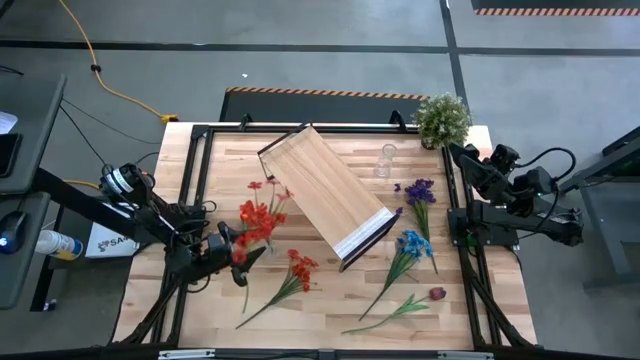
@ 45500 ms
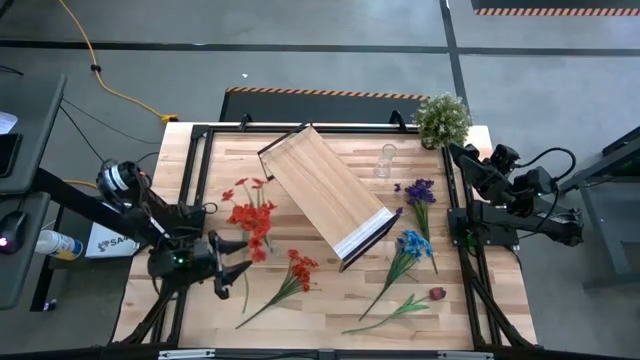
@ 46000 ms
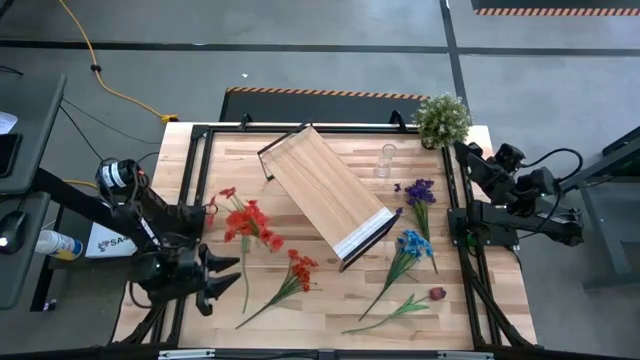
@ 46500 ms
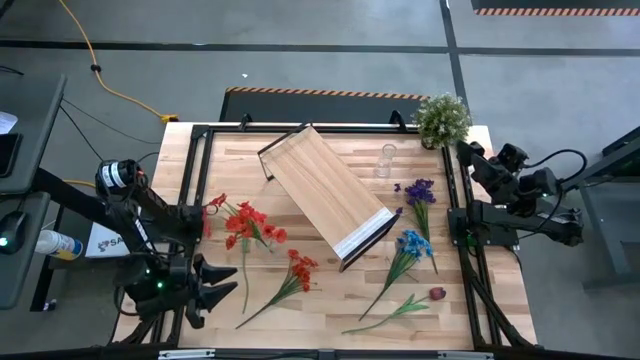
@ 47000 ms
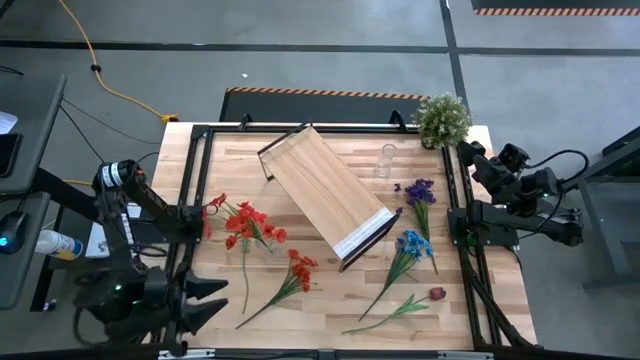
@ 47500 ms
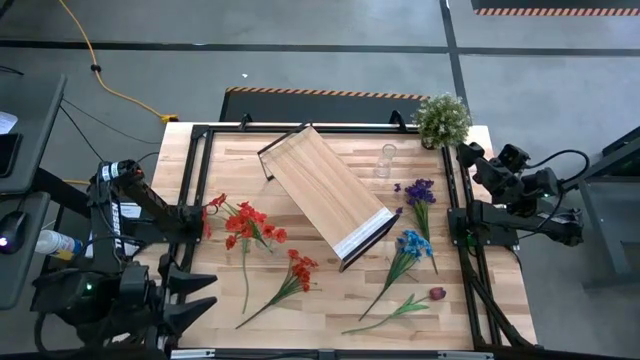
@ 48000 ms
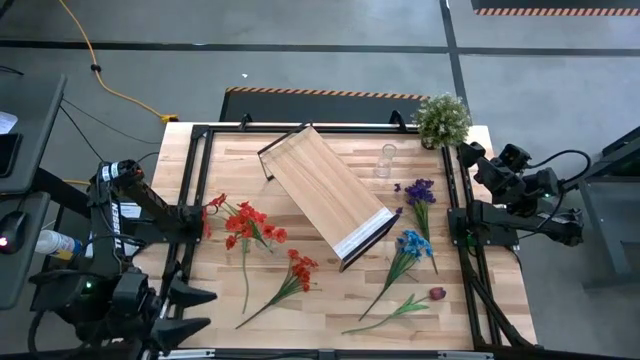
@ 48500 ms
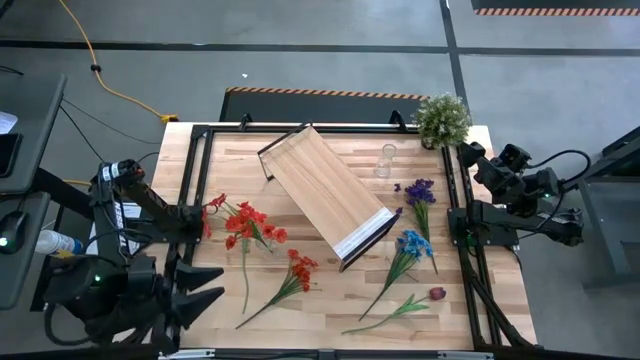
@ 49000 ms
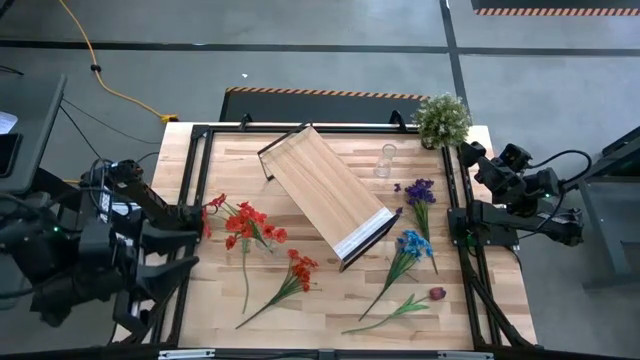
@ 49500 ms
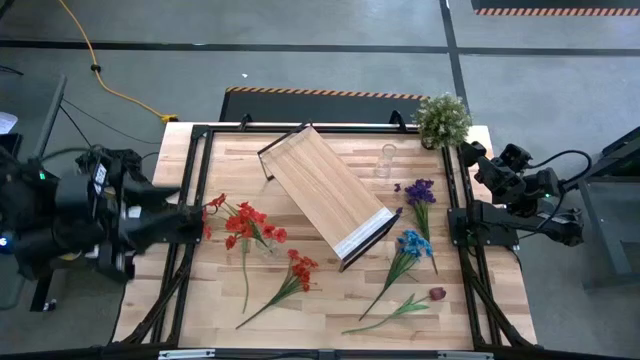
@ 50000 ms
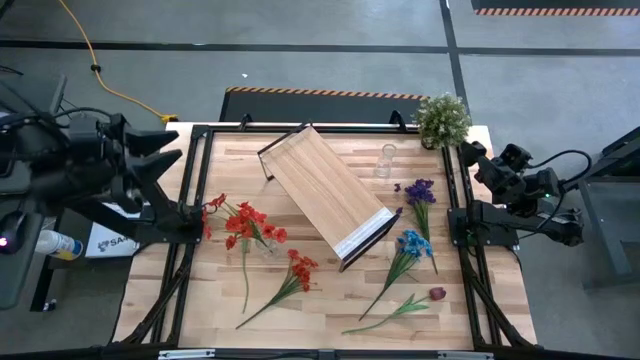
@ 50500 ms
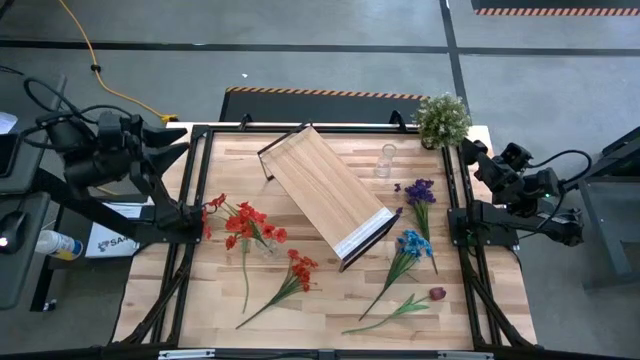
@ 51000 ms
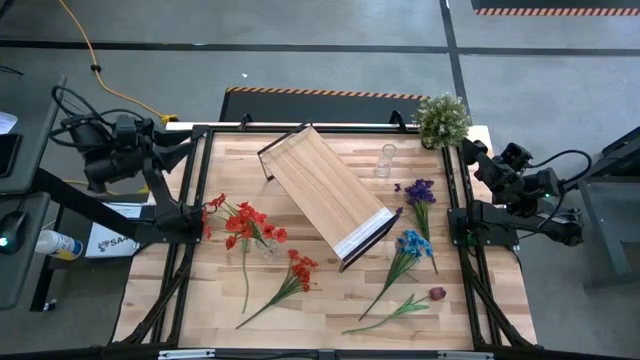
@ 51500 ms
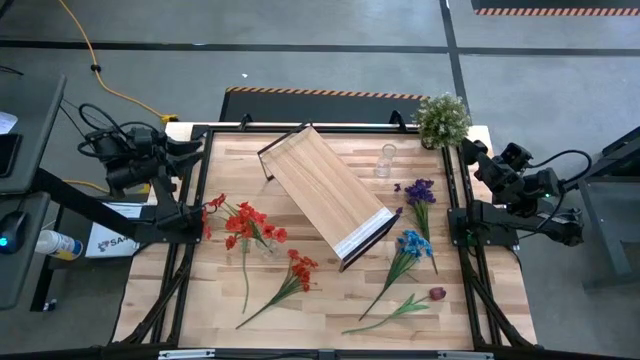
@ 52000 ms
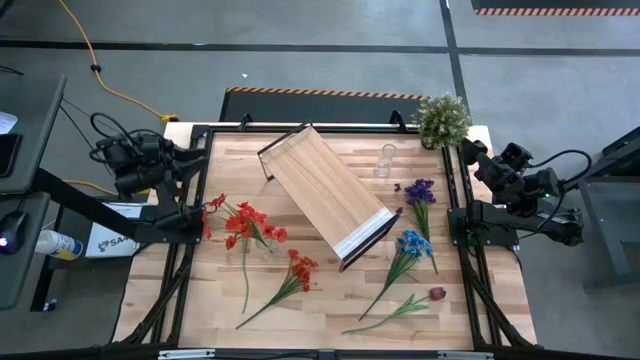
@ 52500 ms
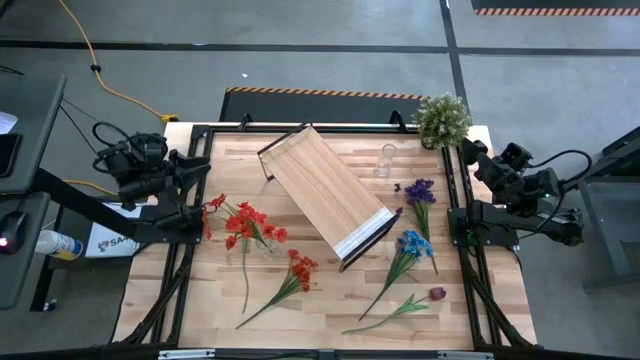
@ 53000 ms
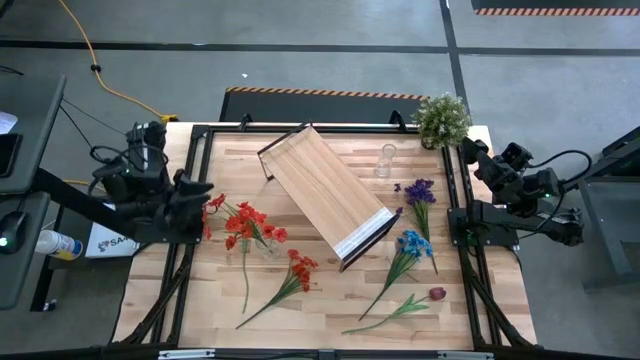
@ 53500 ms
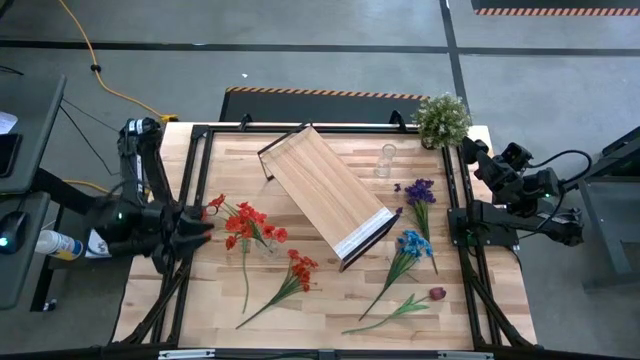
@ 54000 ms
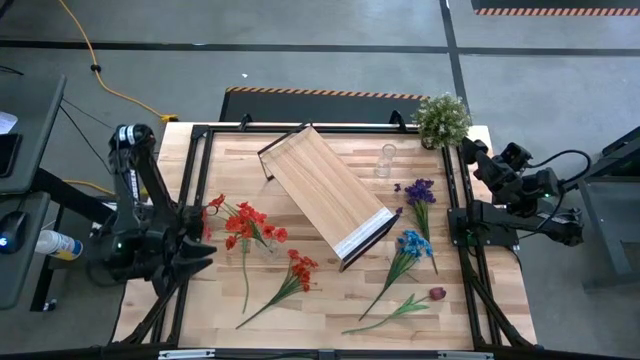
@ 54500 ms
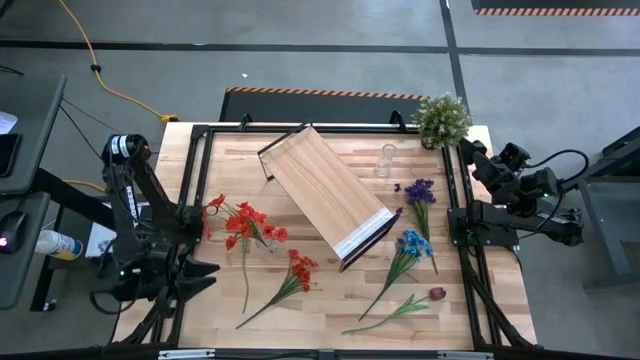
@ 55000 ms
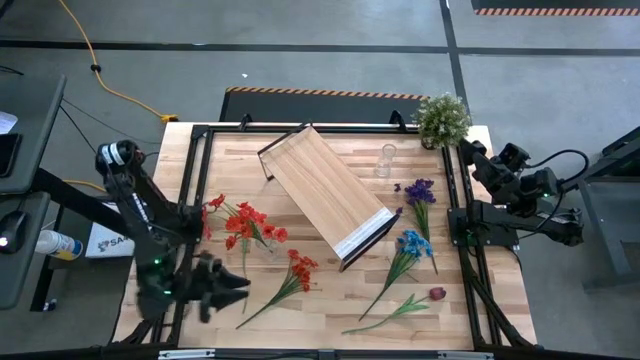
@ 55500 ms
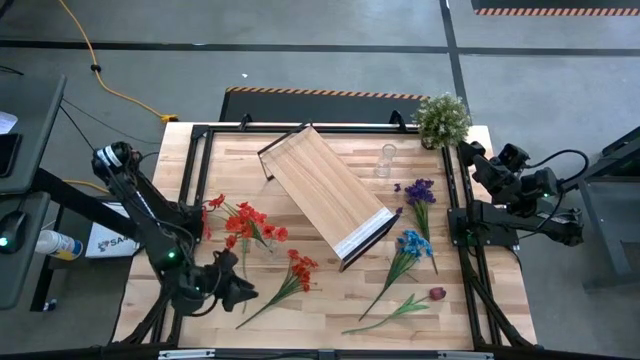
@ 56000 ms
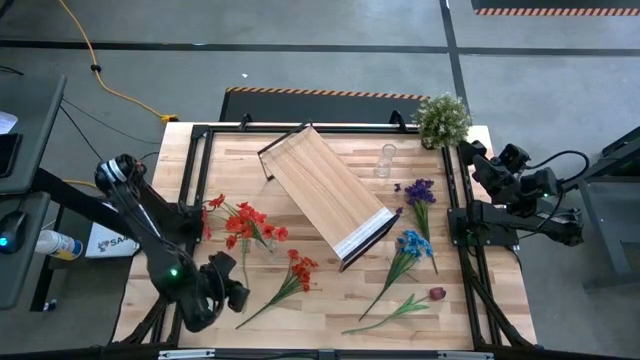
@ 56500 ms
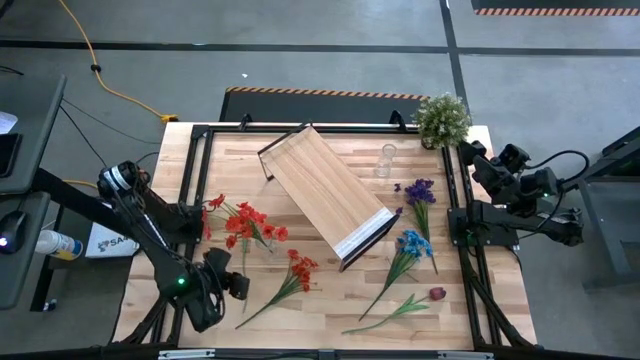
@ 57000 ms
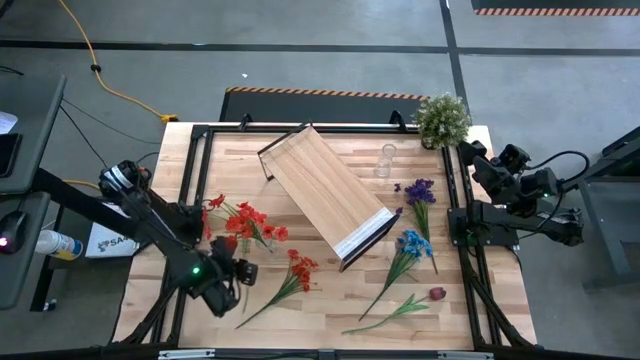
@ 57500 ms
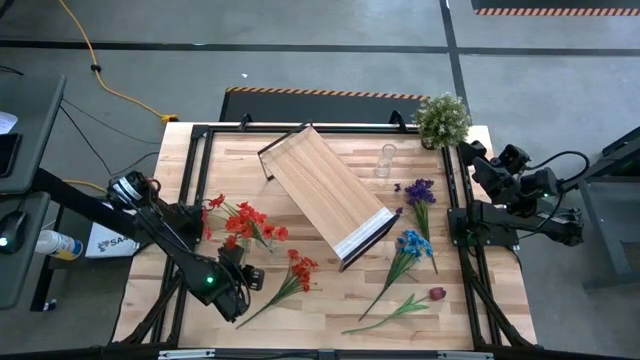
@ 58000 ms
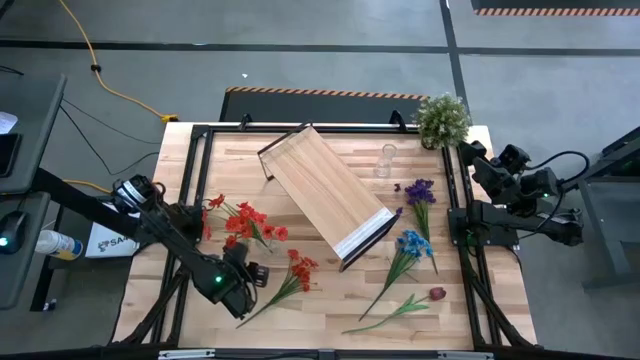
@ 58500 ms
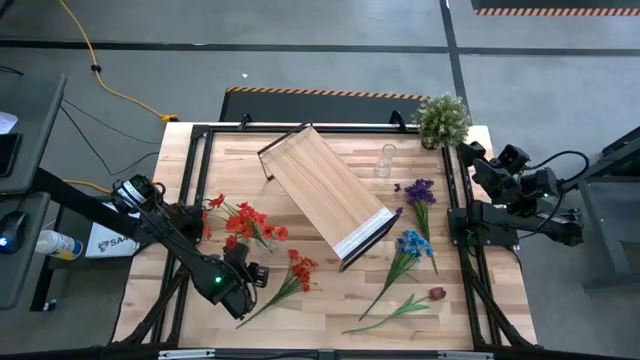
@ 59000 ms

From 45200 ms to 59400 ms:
Task: Pick and place flowers into a vace then onto a shelf
Put the orange flower into the bottom transparent vase

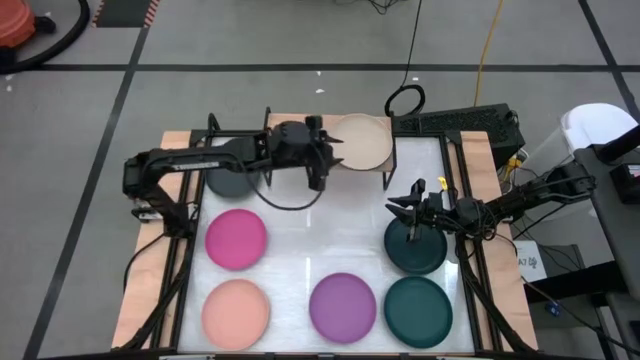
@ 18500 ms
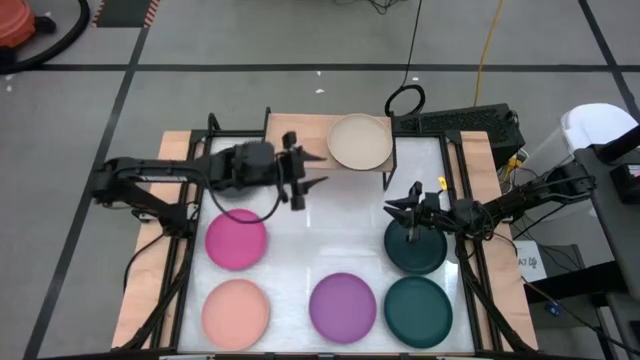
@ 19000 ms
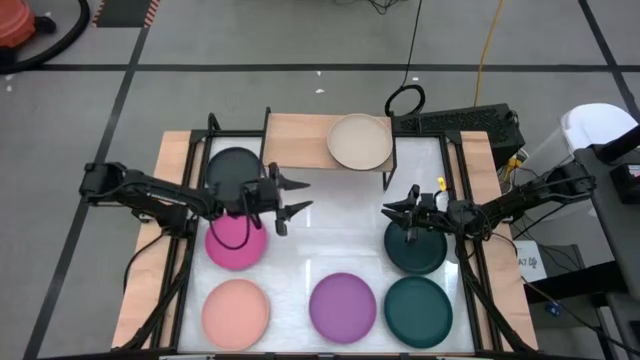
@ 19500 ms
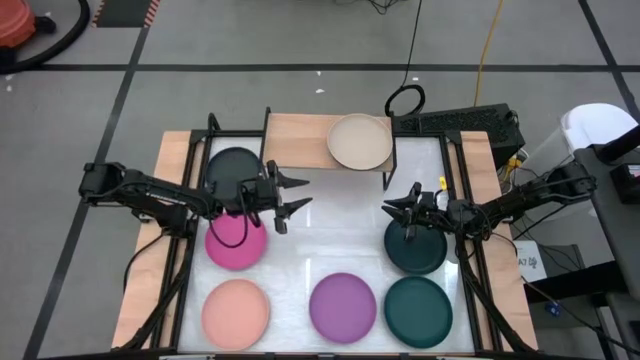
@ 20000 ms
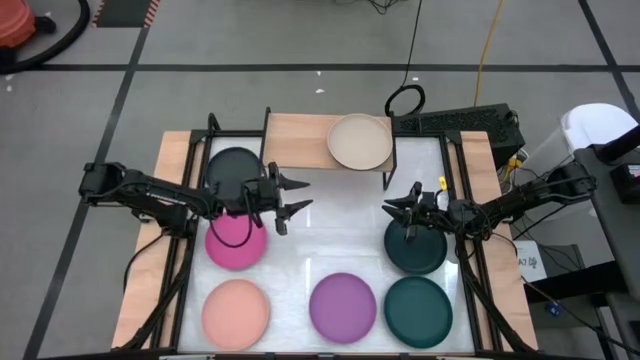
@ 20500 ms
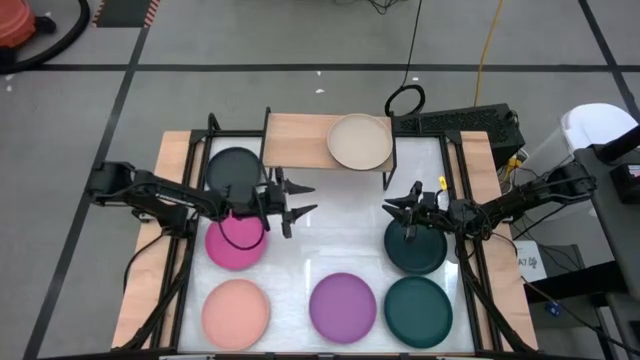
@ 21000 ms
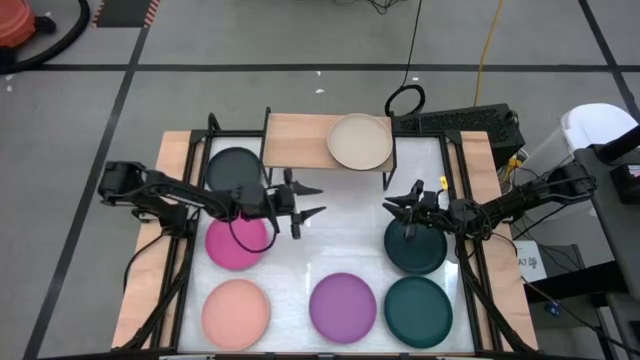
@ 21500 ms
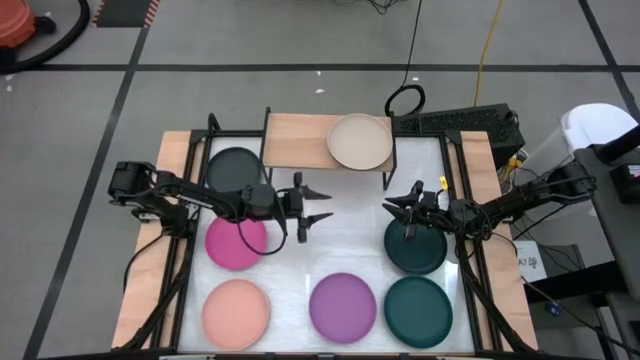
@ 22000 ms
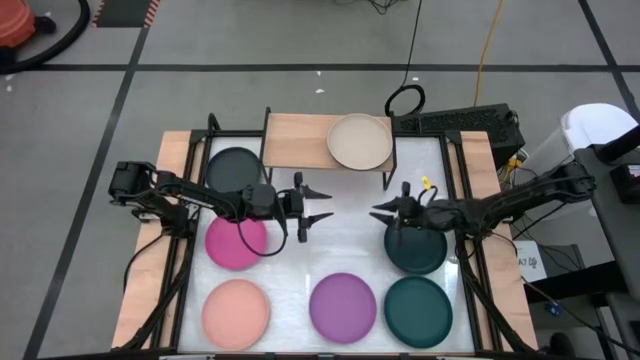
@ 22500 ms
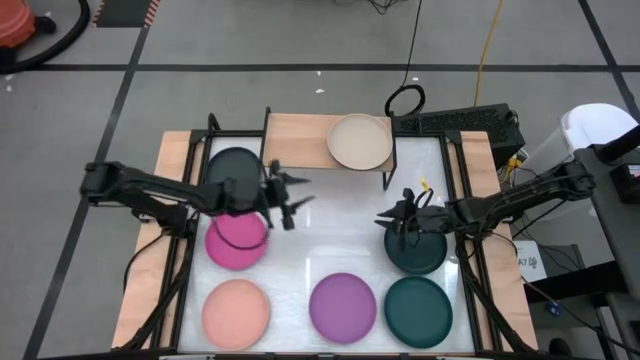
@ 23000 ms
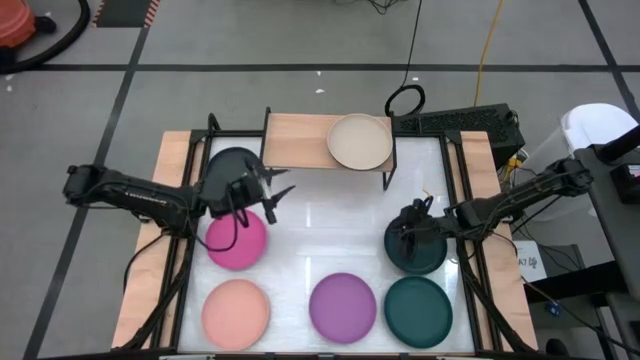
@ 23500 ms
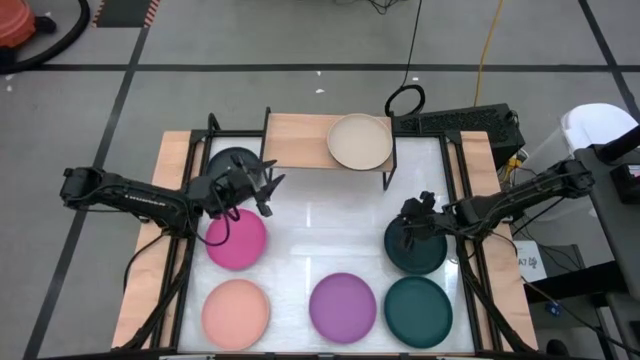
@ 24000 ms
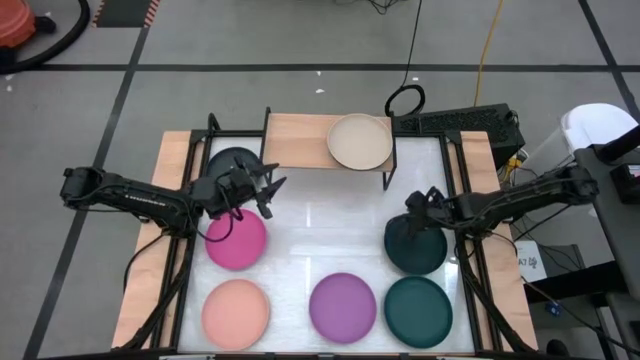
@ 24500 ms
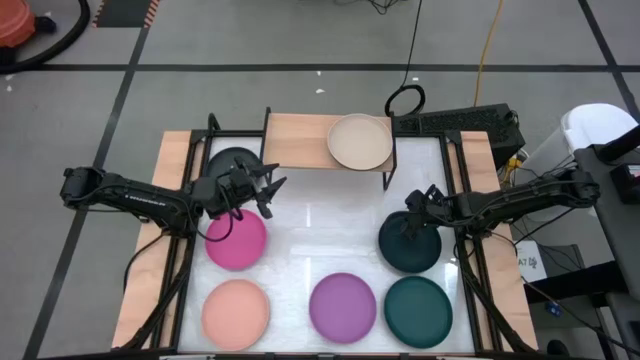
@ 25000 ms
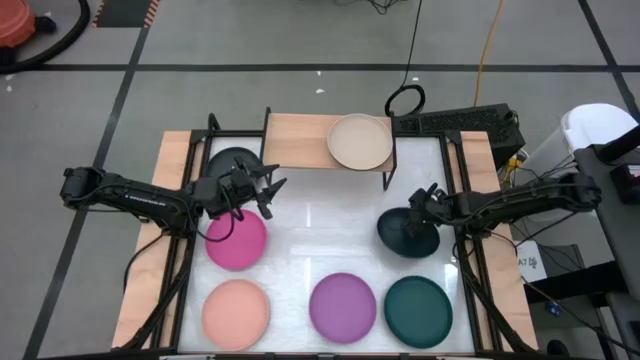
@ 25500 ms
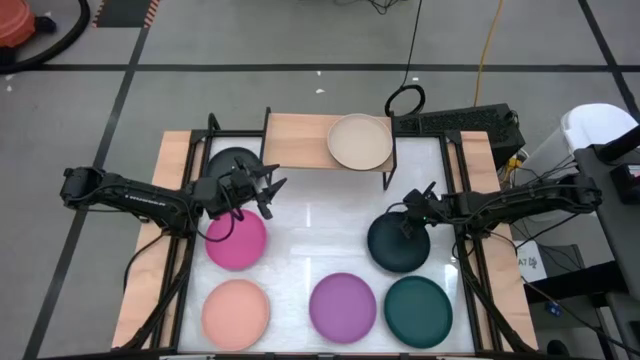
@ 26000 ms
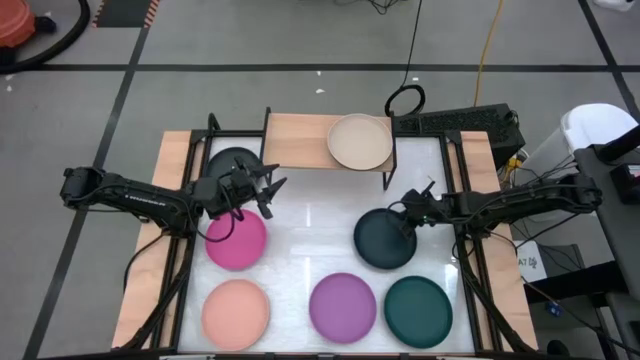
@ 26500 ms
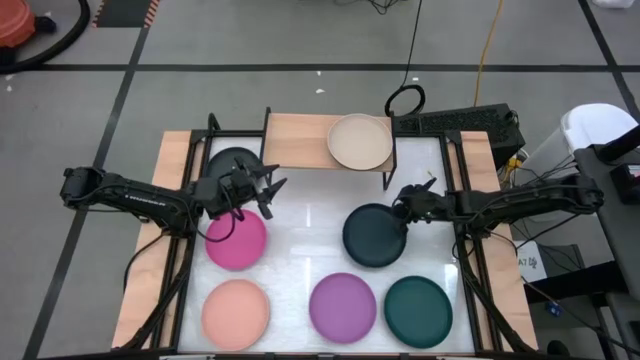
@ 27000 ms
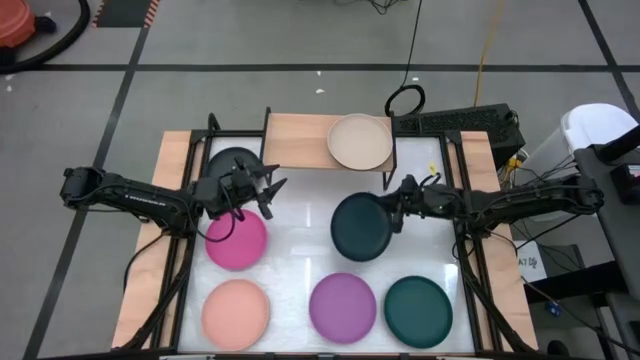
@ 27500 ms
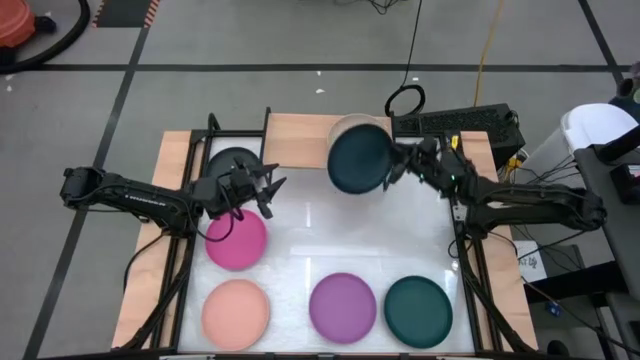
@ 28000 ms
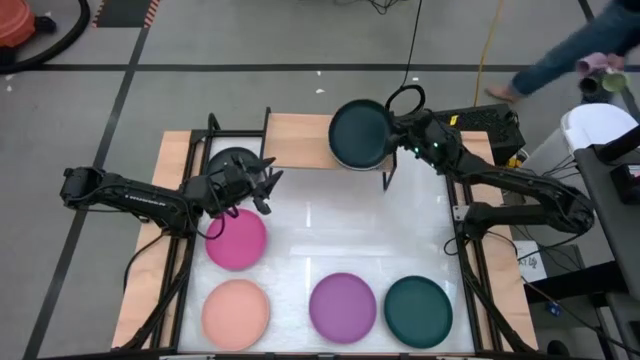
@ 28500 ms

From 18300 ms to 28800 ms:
Task: Place and stack plates onto a shelf
Stack the top dark green plate on top of the light brown plate on the shelf
